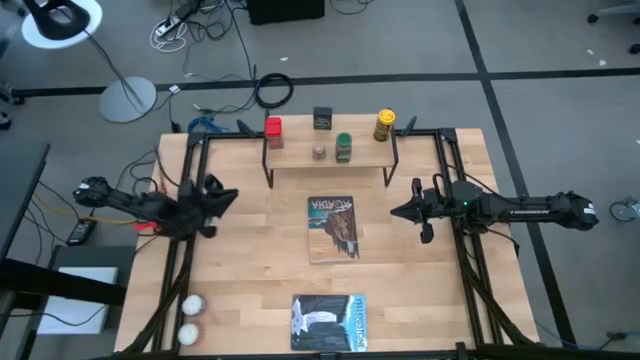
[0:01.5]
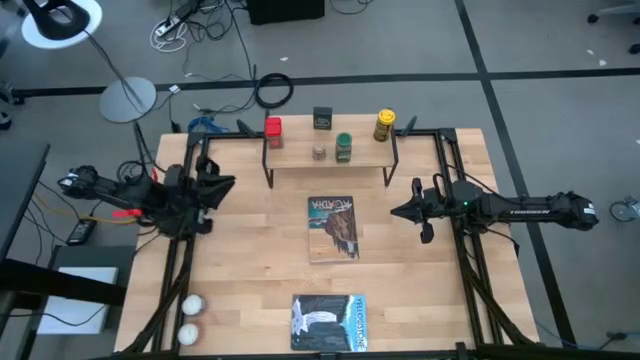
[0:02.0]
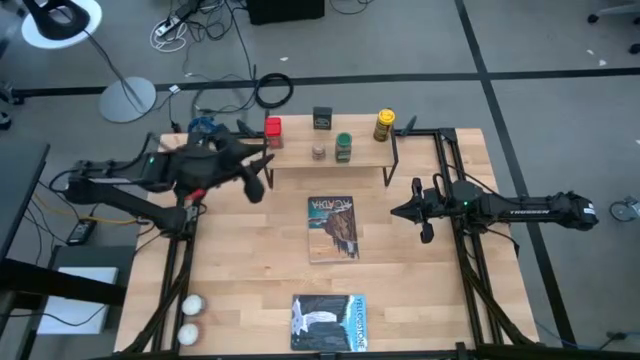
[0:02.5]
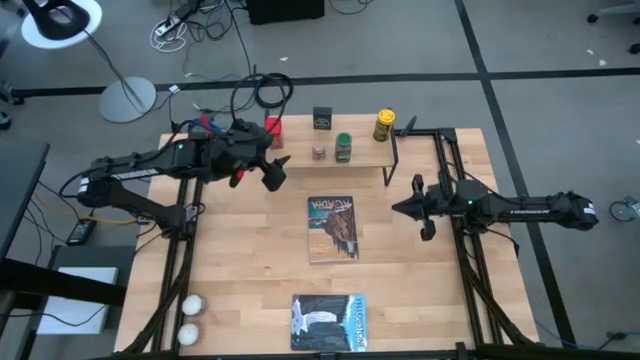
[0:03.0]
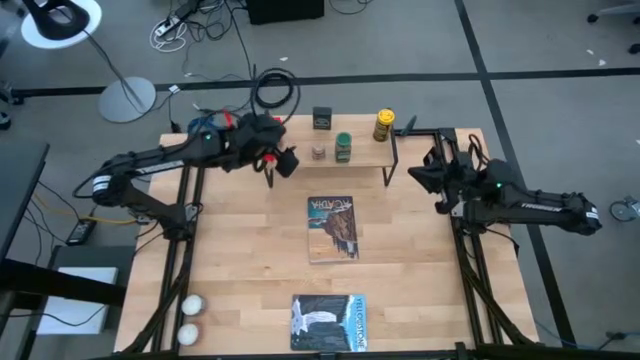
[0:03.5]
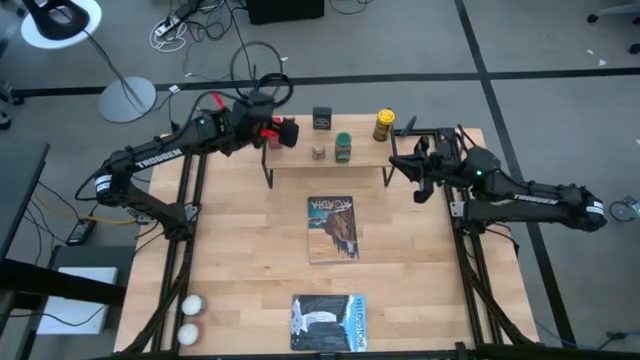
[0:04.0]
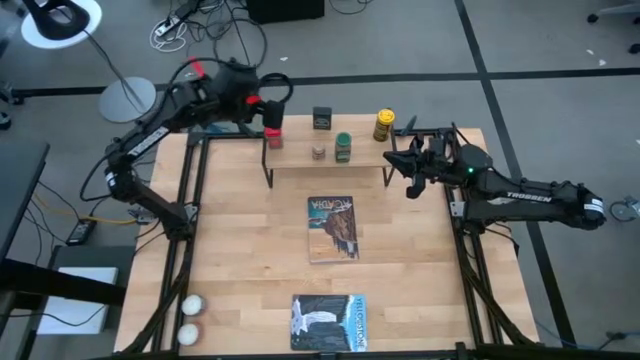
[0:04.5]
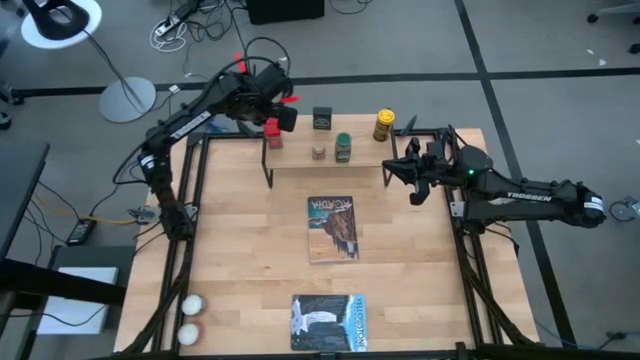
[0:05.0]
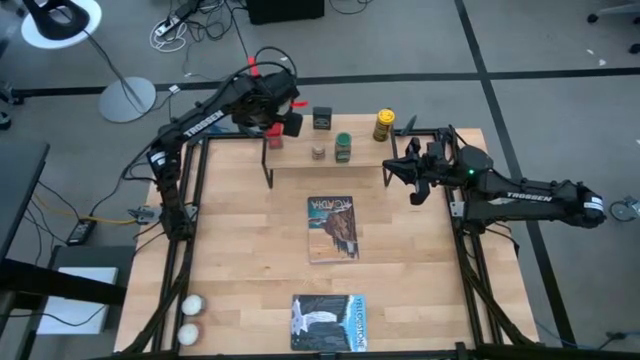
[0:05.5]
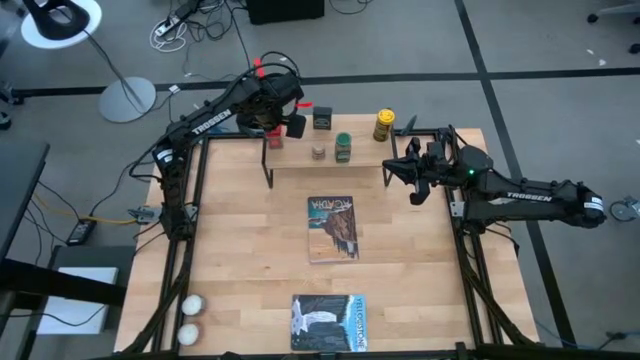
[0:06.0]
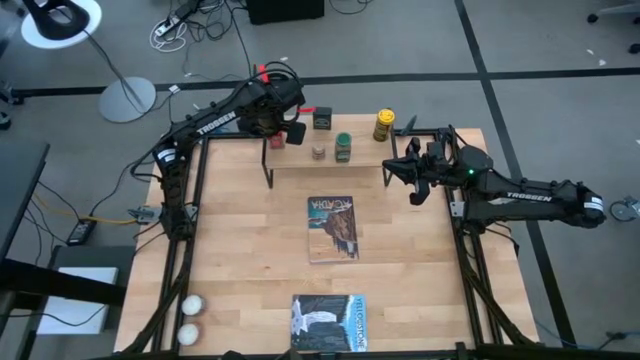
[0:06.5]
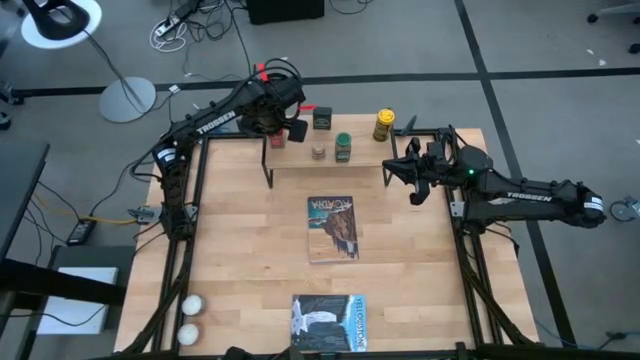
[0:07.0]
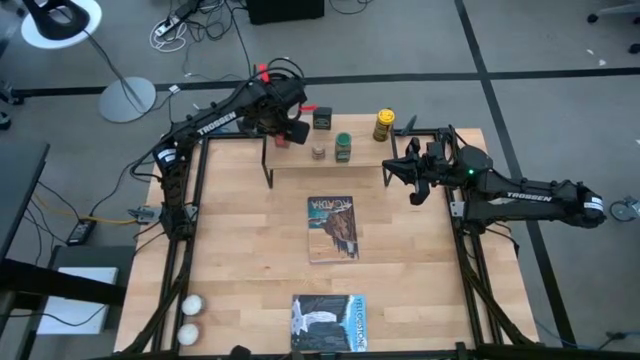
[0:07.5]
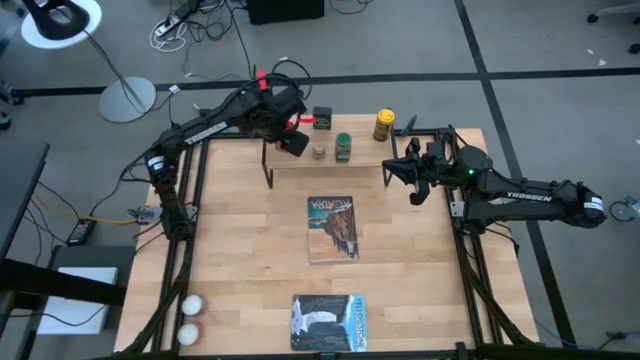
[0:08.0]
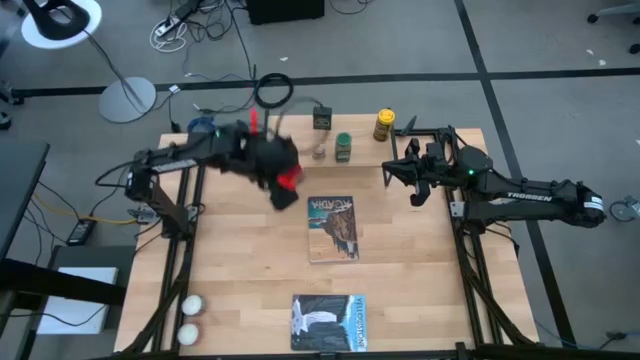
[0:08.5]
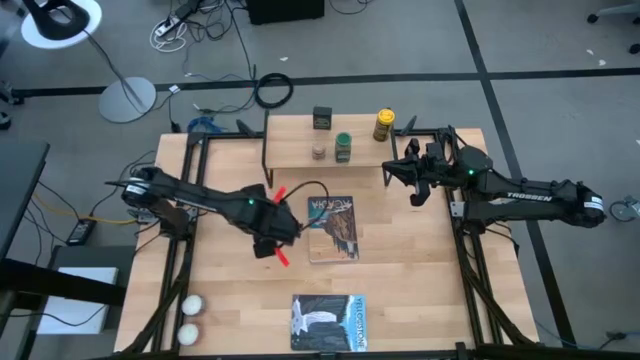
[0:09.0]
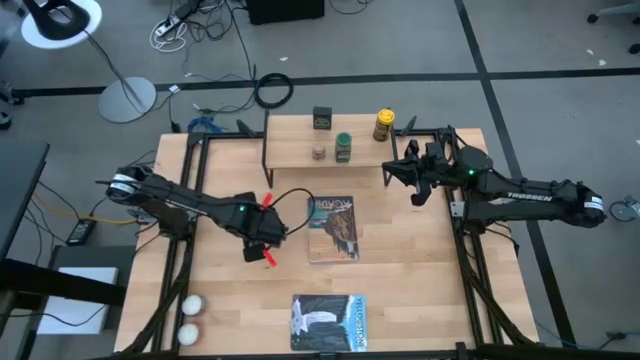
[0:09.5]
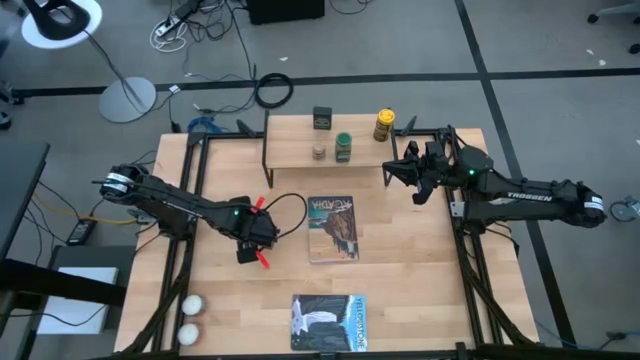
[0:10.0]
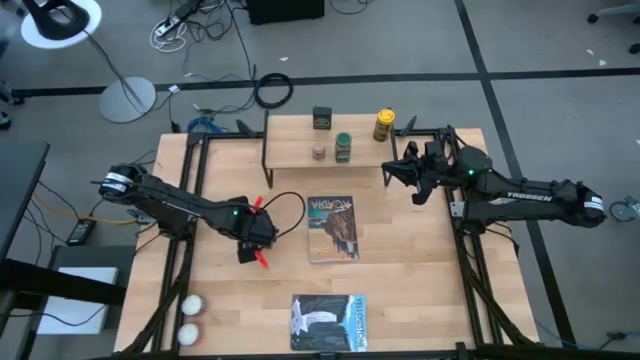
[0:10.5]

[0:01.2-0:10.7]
Task: Shelf spices
Remove the red seasoning can on the shelf

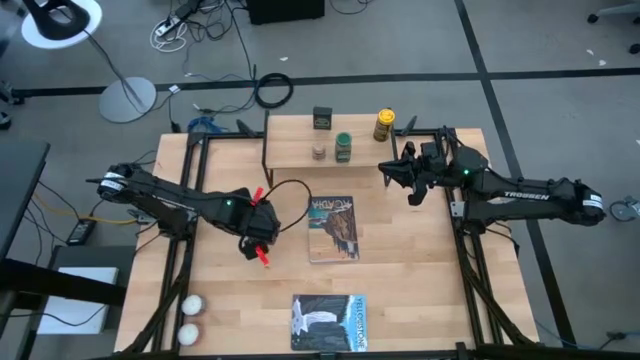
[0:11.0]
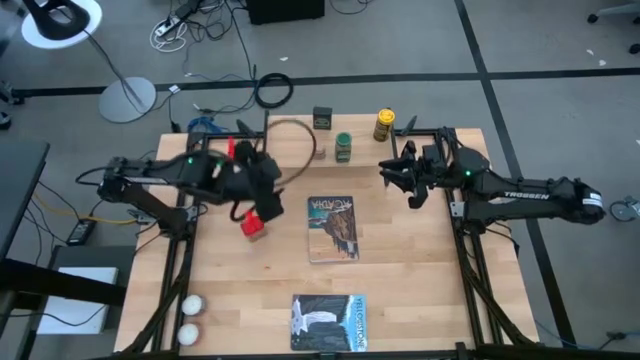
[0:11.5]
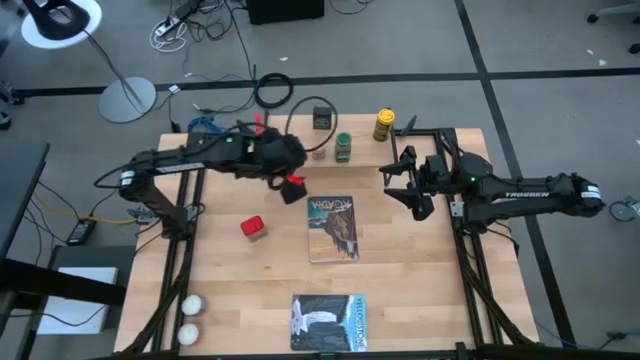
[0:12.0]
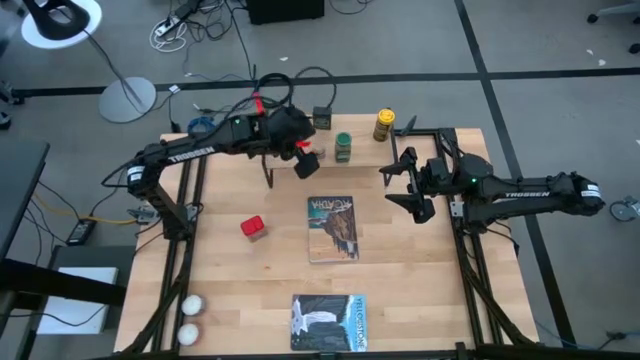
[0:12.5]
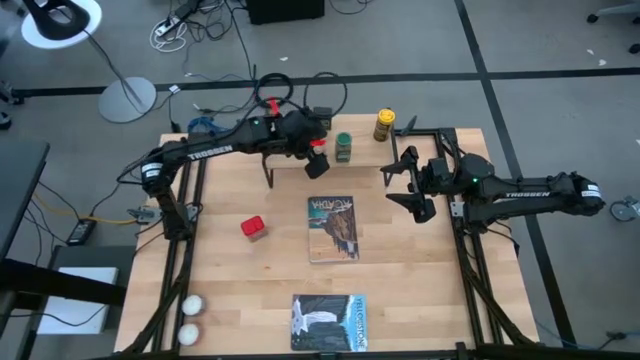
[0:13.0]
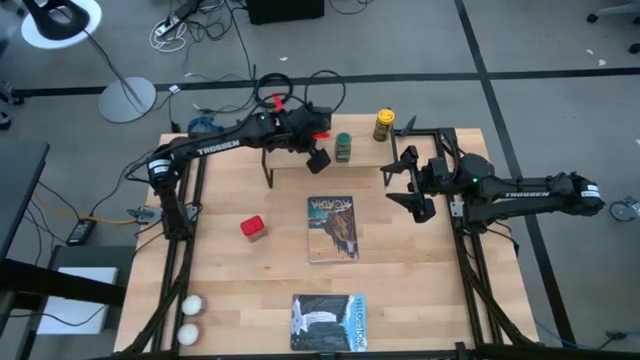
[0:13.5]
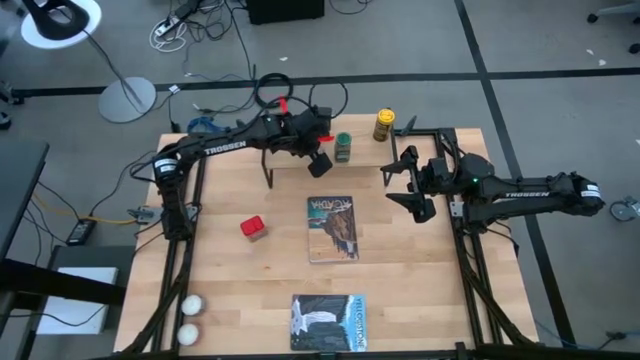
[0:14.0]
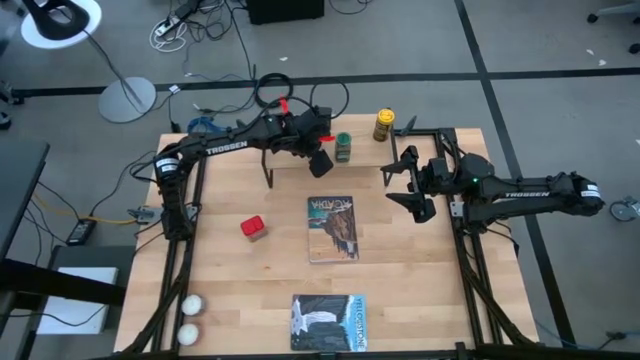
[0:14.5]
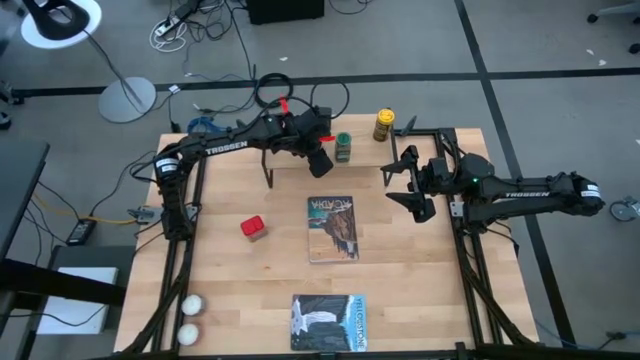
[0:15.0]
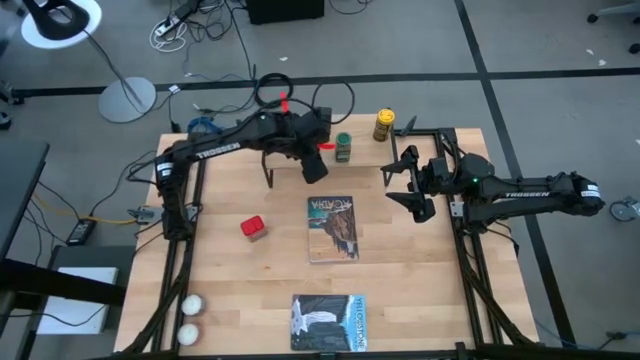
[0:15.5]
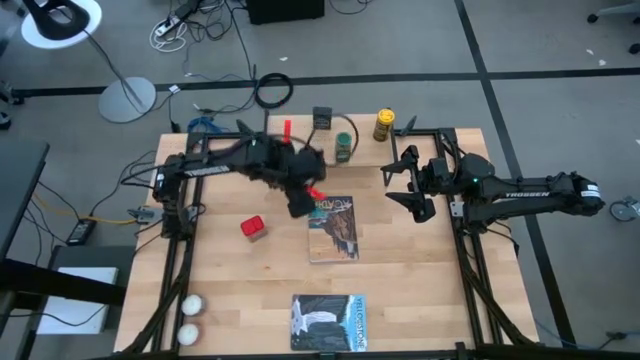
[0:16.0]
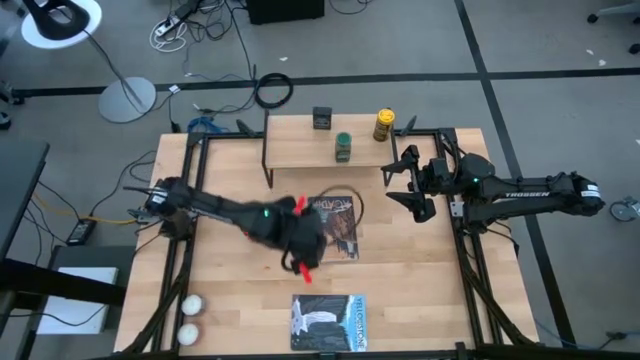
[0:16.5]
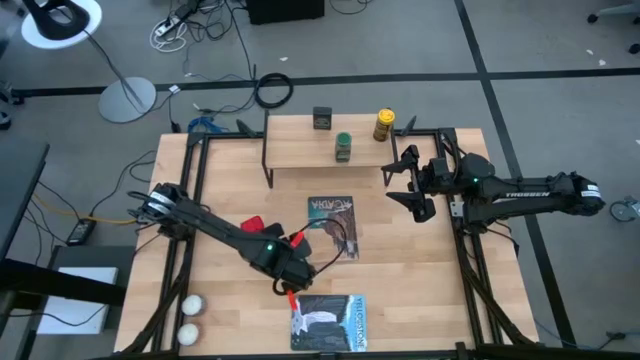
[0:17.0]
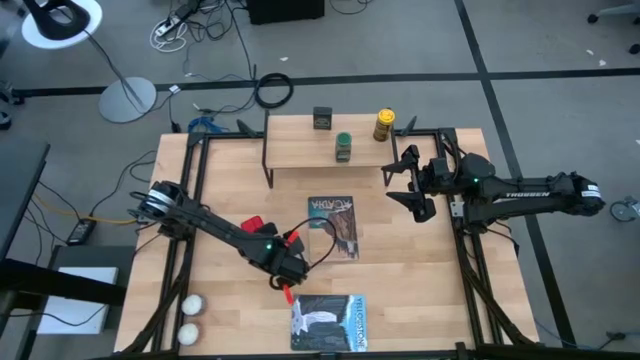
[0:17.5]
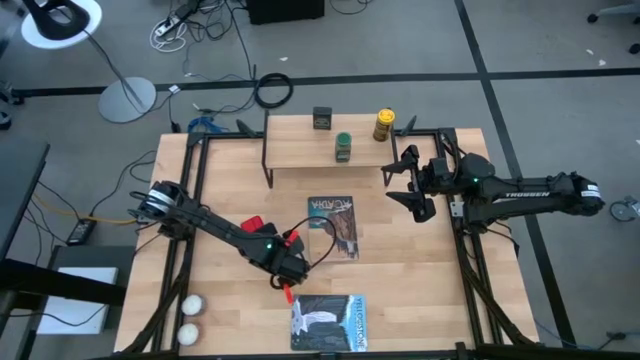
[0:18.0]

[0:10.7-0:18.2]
Remove the brown seasoning bottle on the shelf

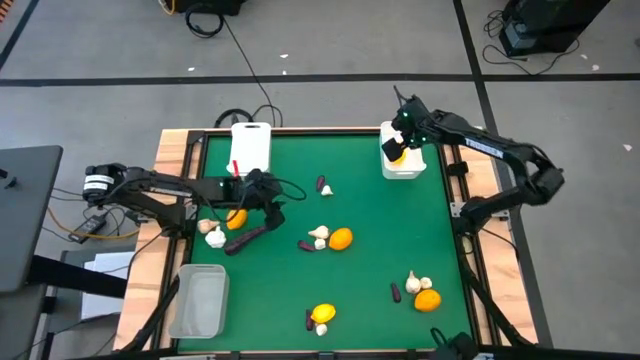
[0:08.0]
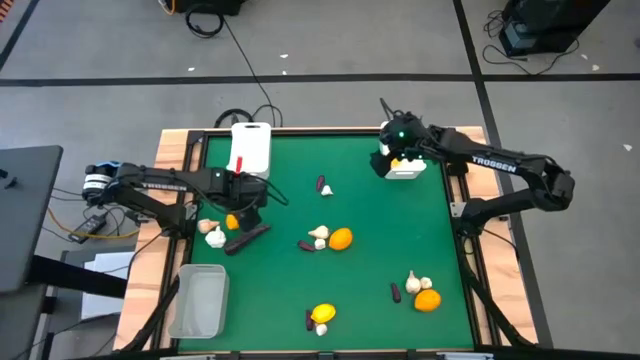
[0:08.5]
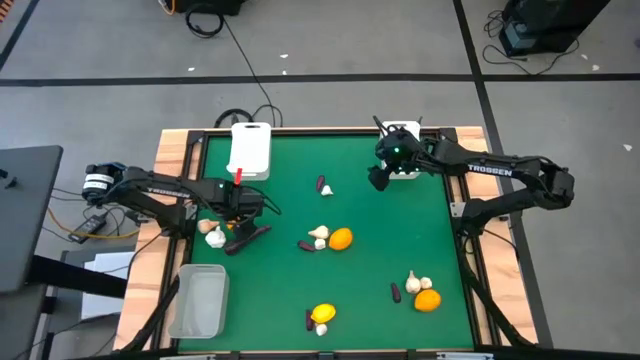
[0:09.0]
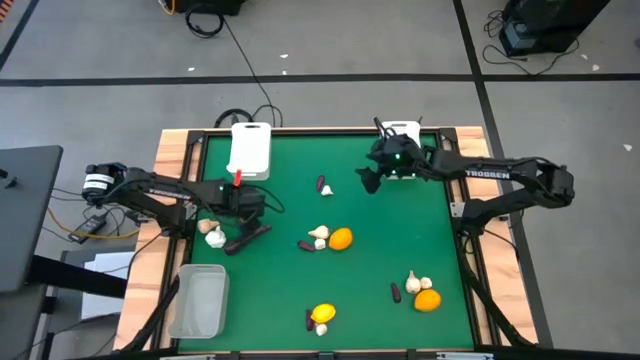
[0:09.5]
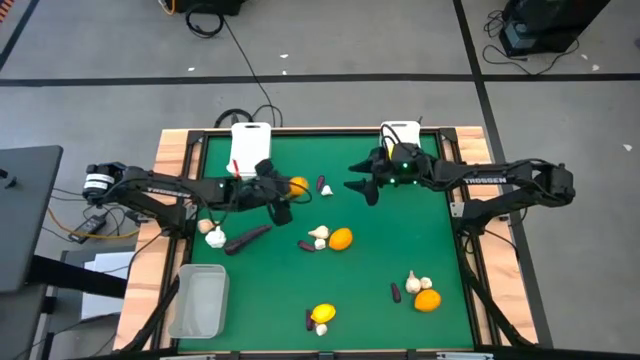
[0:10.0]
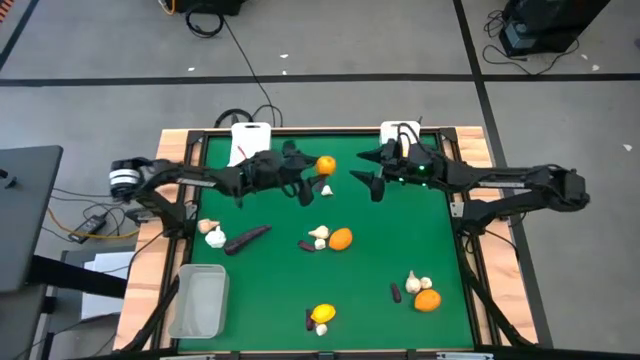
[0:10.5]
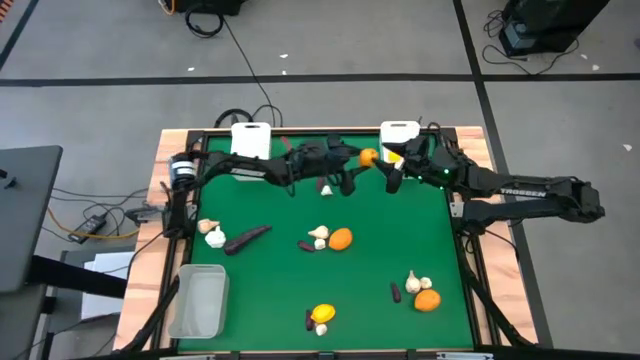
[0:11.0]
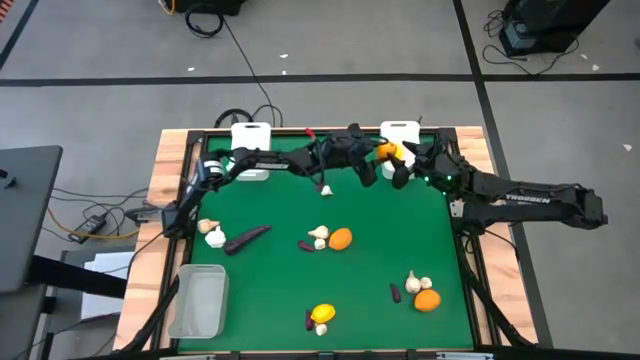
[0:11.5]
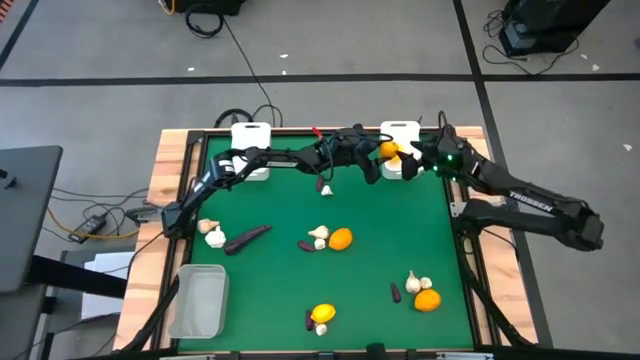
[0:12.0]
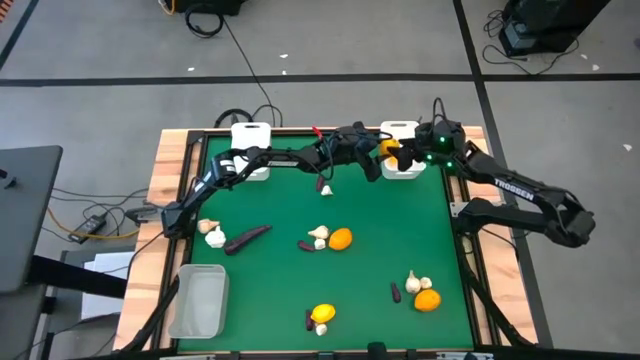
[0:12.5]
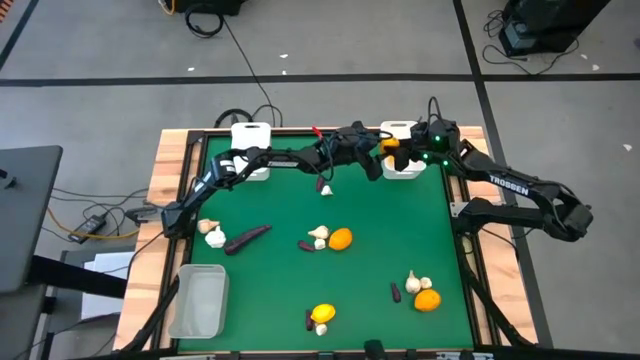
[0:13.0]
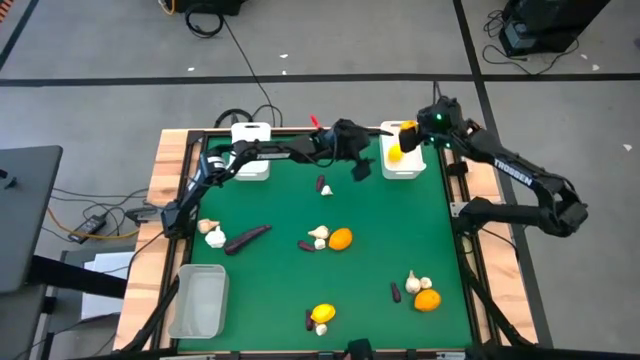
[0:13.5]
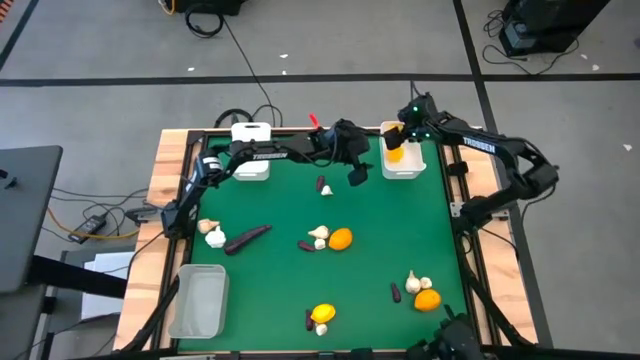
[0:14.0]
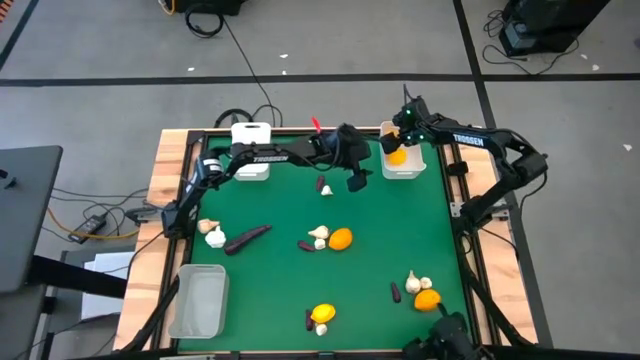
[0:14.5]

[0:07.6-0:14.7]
Task: Sort produce into baskets
Put the lemon on the right white bin
